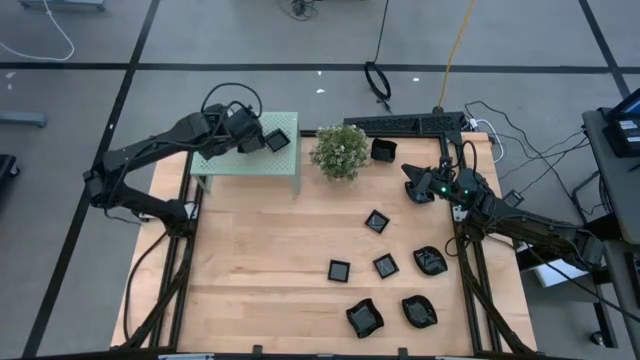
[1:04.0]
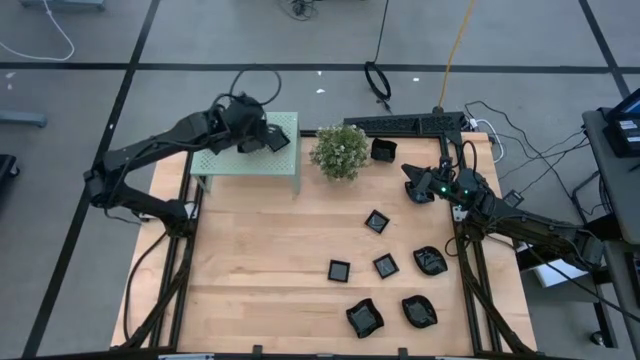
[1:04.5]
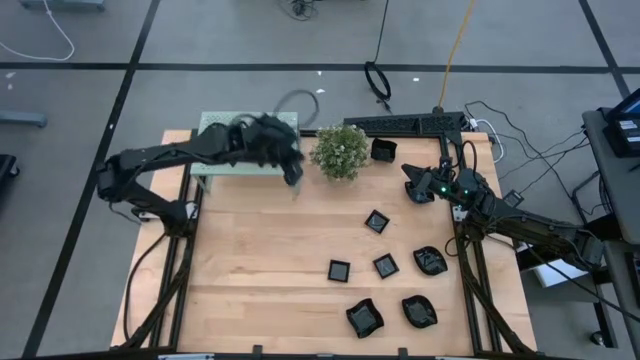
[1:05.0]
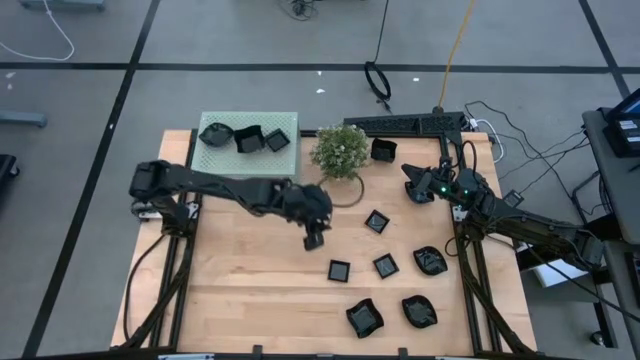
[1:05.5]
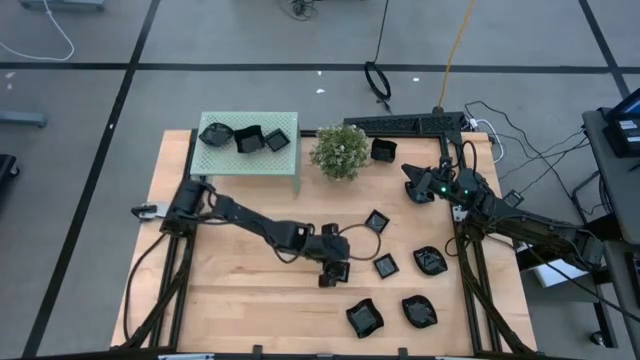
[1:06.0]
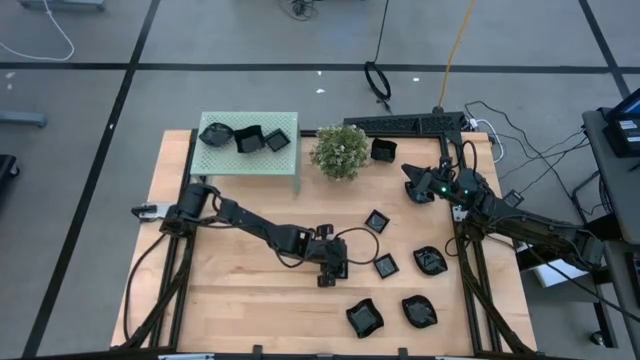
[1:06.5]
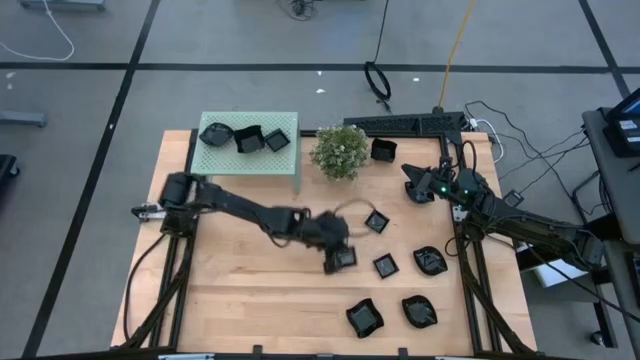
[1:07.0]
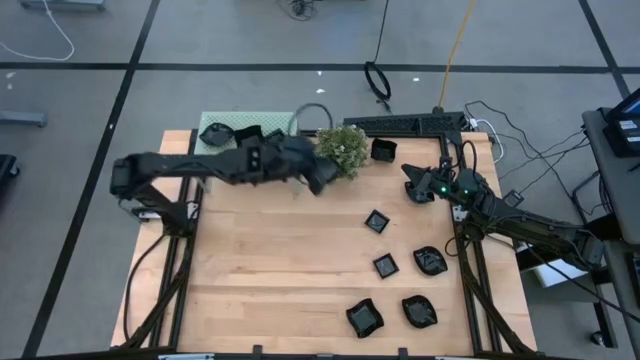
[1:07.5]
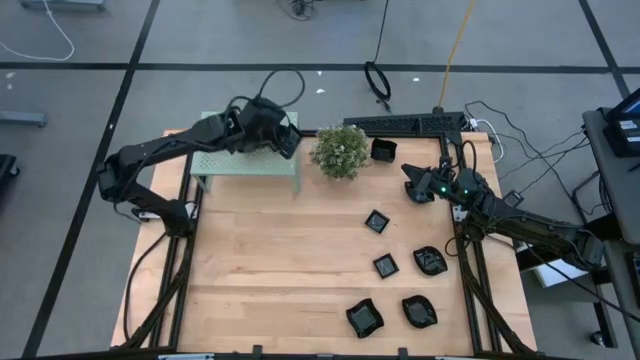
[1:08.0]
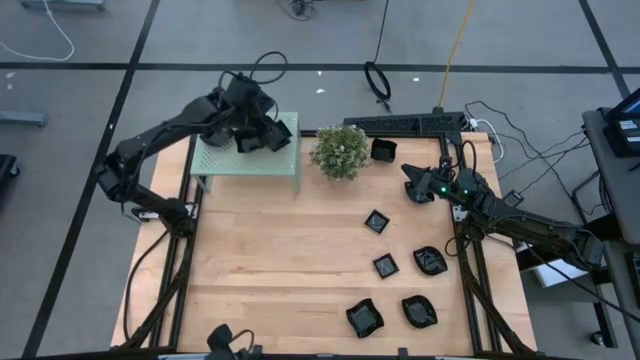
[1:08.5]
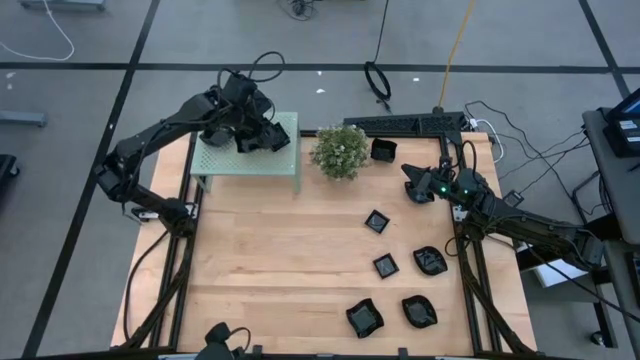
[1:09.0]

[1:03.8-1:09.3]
Task: Pick & Place Mini shaped plates
Stack the square plate on top of the square plate on the shelf

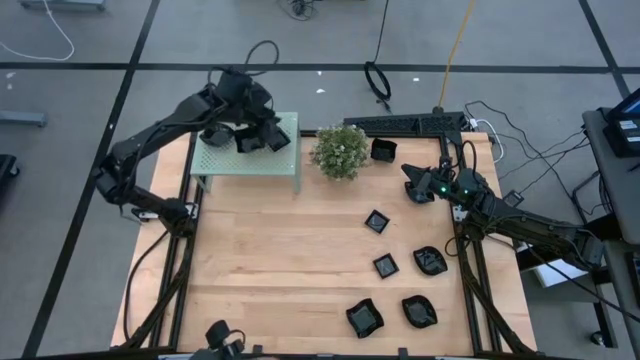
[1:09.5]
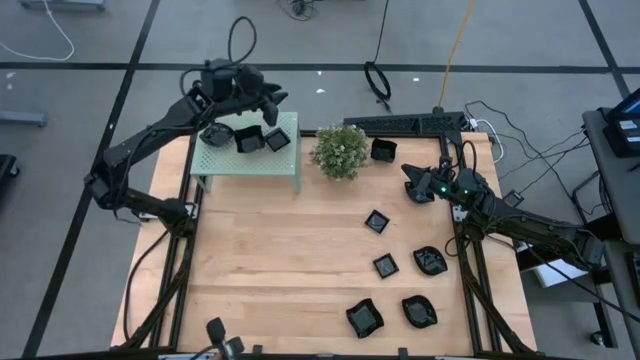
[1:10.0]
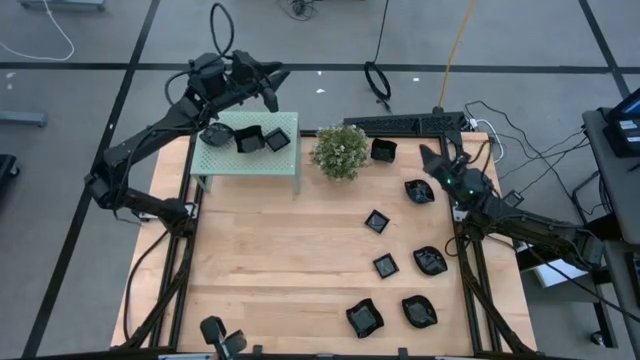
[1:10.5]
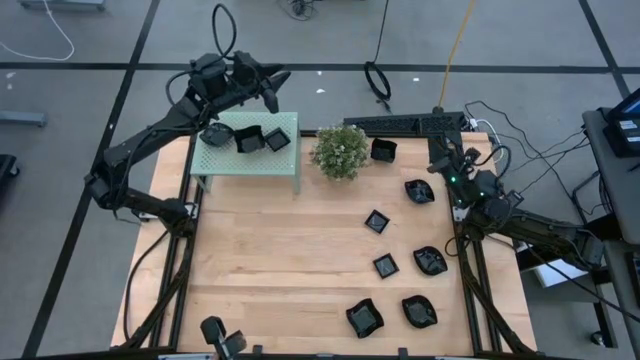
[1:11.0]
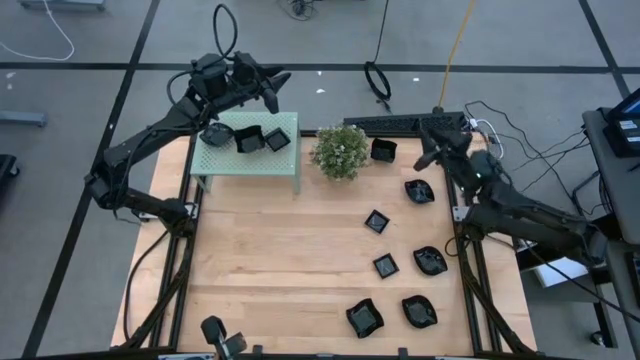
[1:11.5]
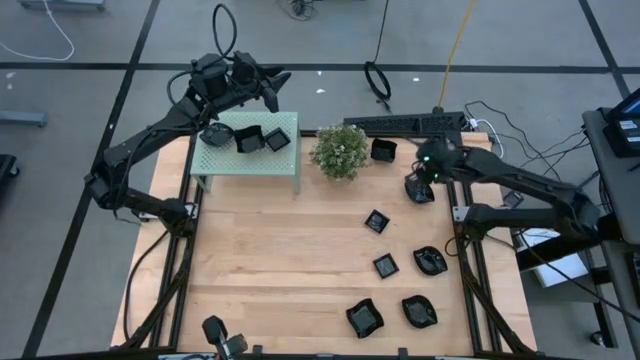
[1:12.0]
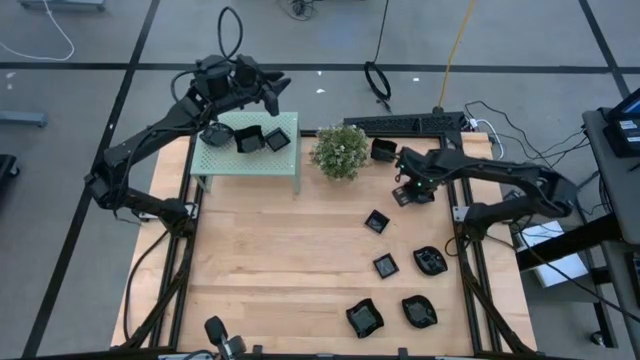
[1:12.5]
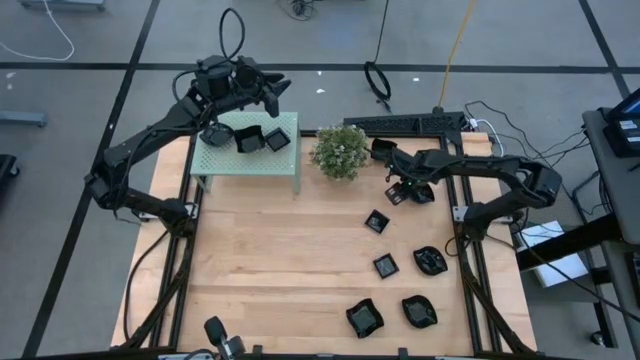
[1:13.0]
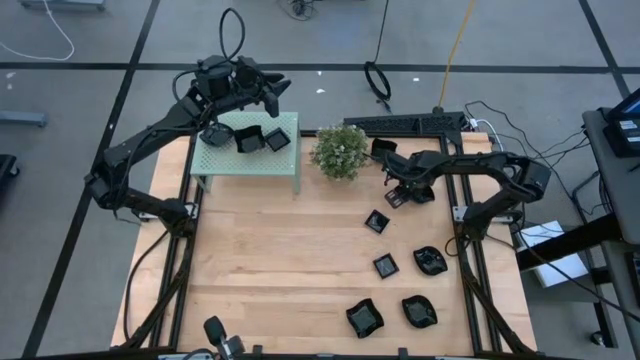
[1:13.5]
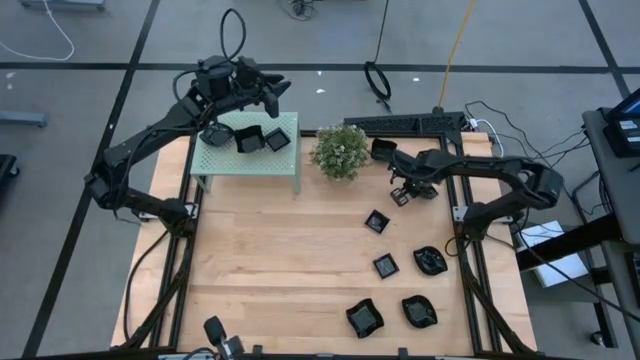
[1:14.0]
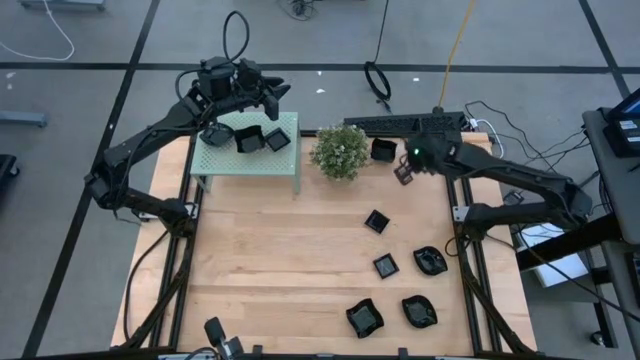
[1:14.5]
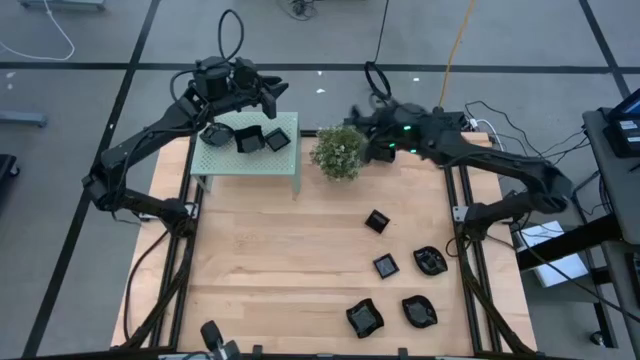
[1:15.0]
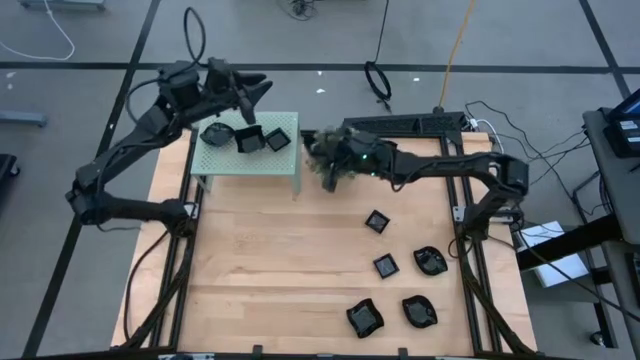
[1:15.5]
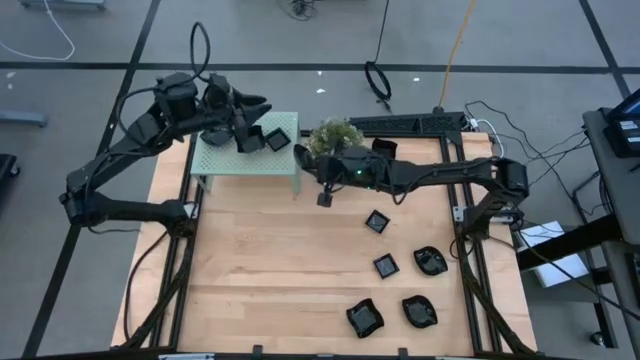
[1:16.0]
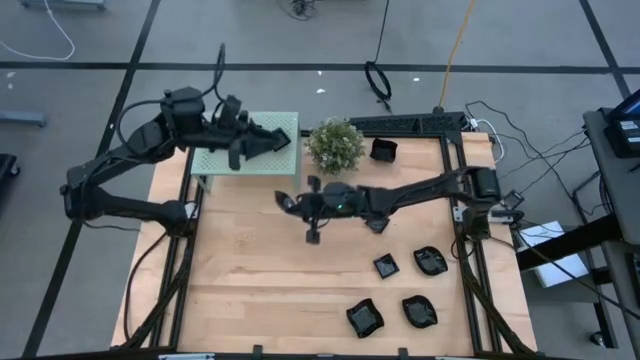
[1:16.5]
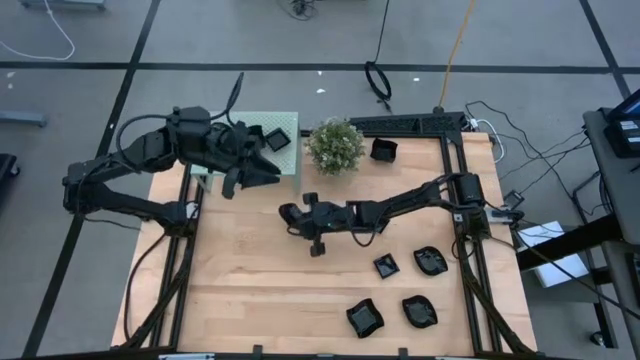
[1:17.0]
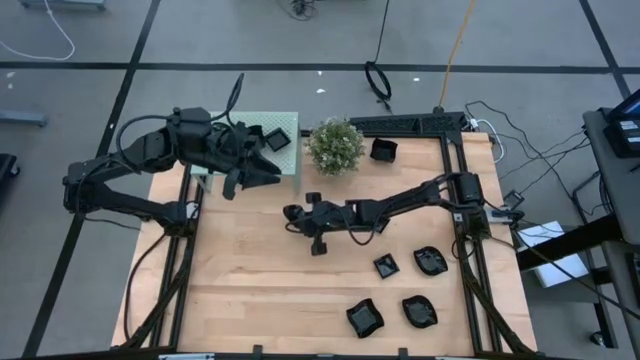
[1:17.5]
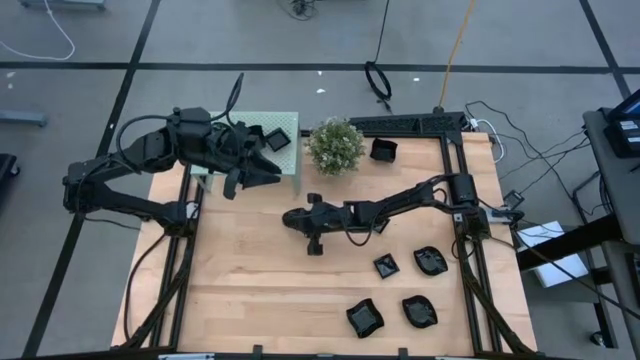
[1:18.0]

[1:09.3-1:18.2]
Move the leaf shape plate on the center of the table

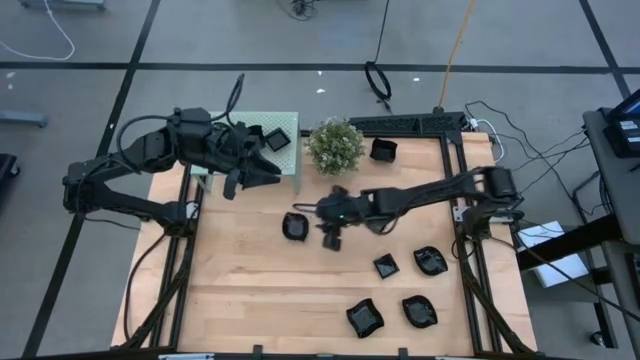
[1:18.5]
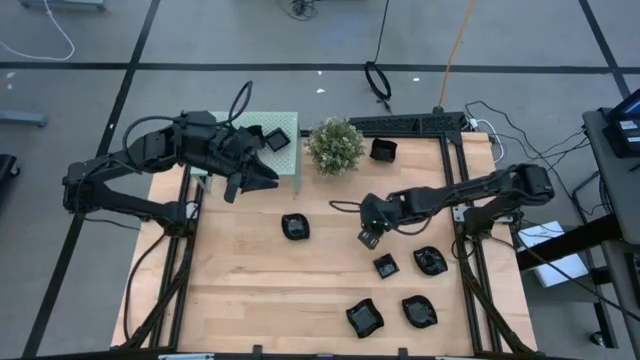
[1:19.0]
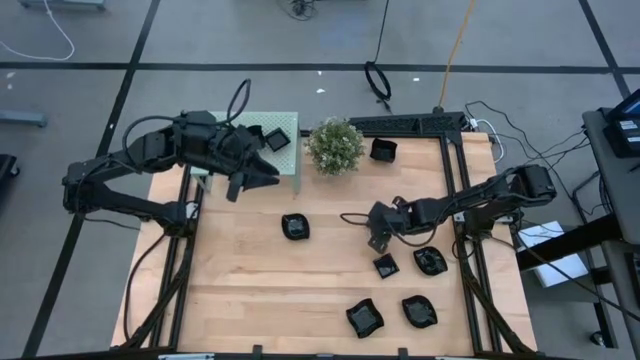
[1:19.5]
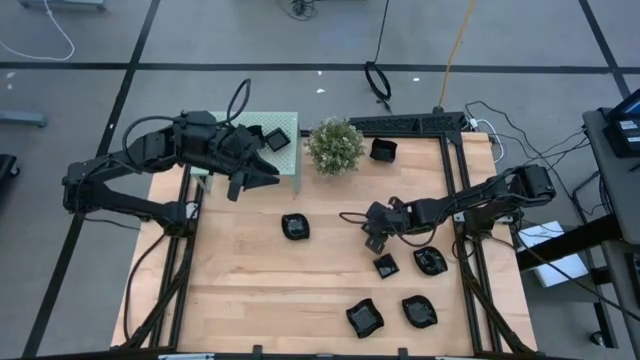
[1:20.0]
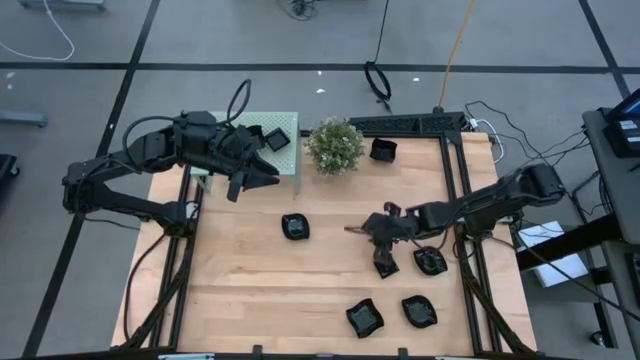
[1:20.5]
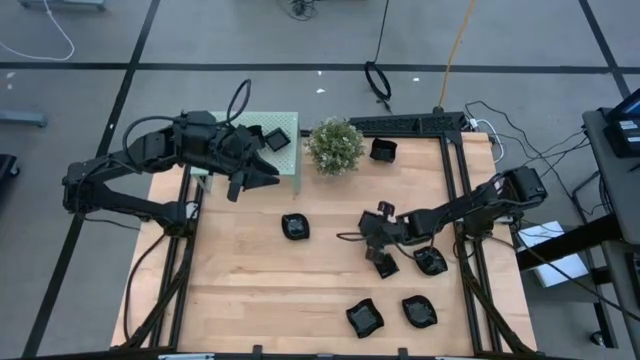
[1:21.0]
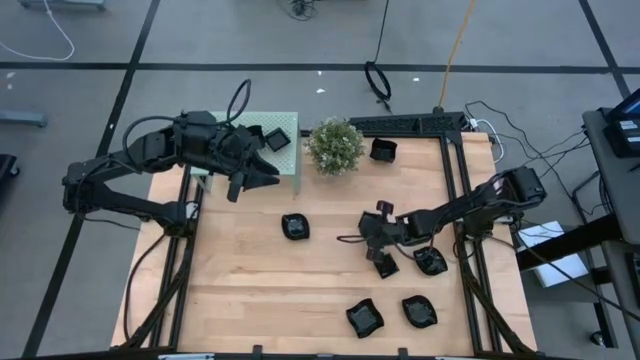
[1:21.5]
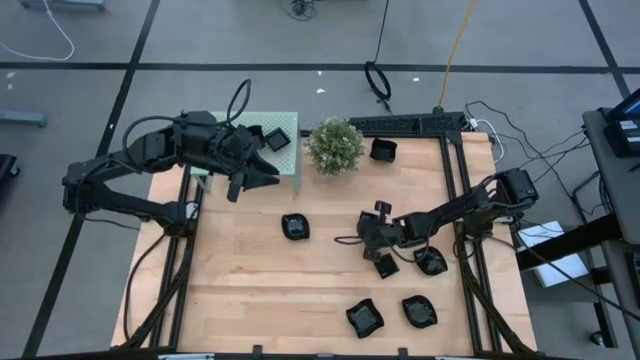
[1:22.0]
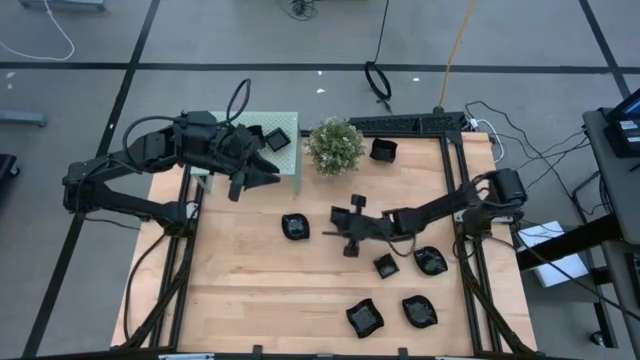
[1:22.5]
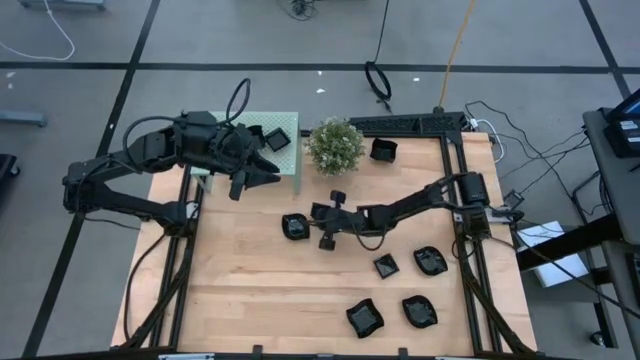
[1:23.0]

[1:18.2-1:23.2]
Move the square plate on the center of the table

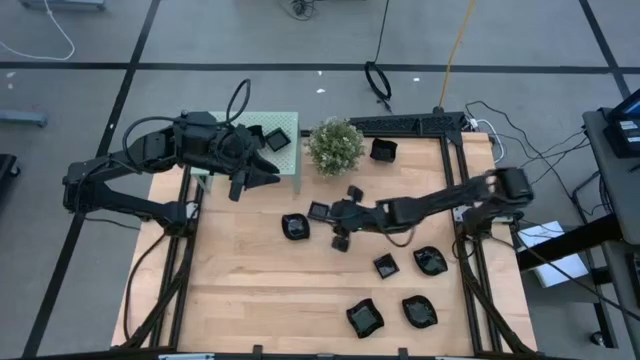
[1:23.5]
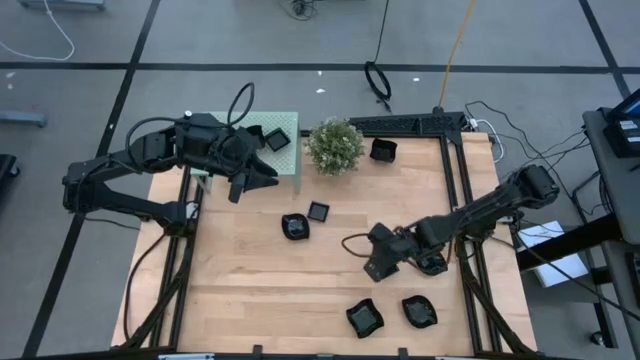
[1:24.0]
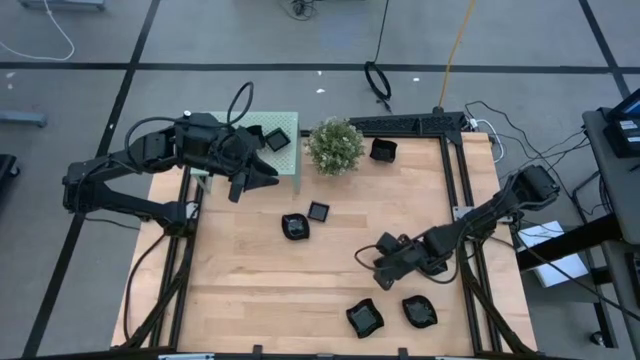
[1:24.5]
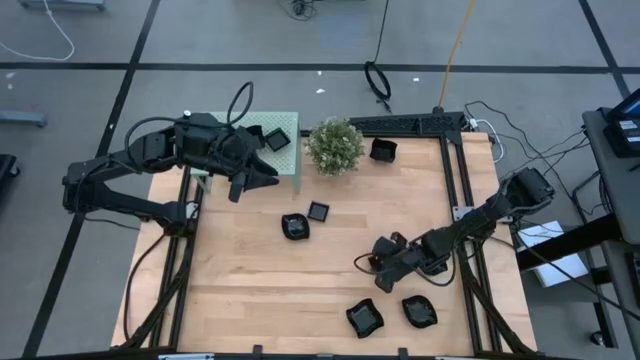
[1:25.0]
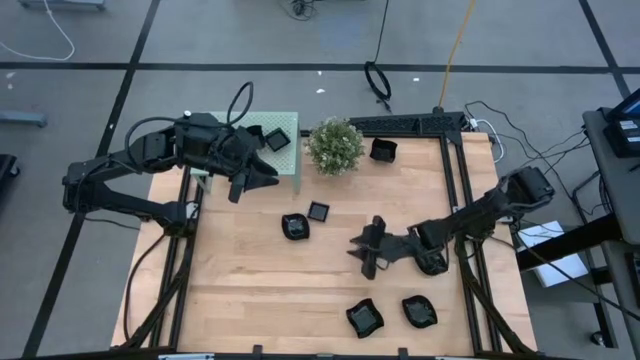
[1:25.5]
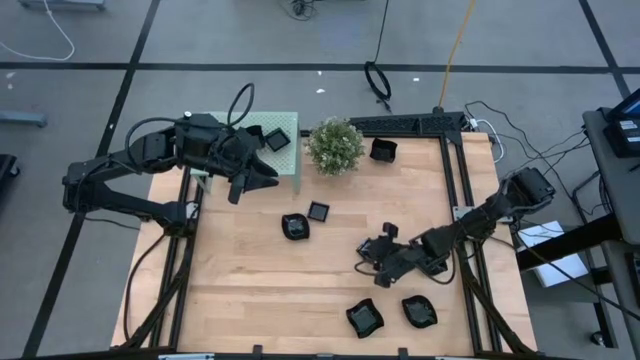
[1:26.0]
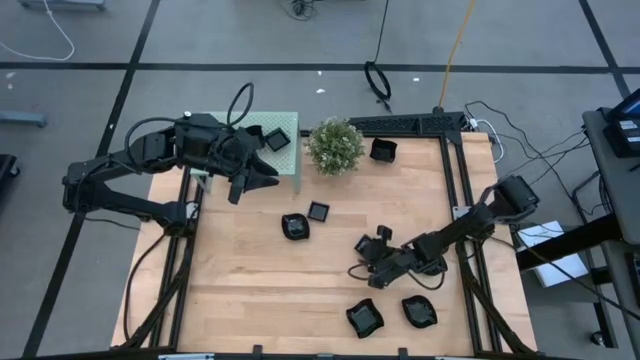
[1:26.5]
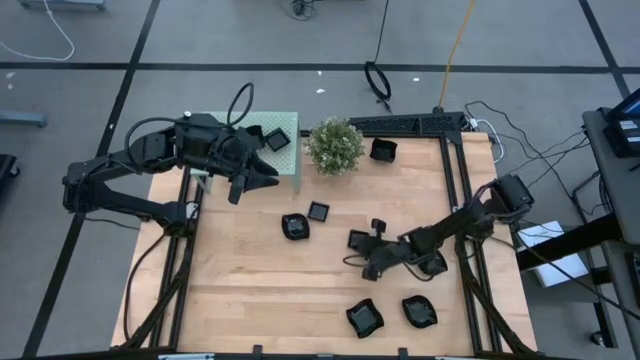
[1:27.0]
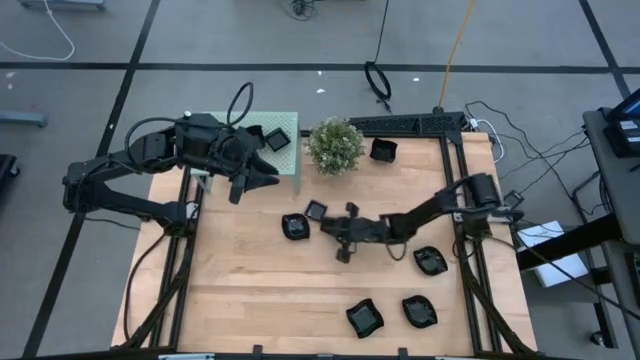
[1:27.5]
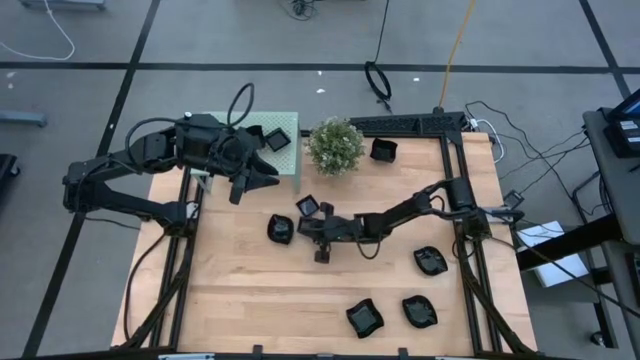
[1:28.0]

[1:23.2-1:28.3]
Move the square plate on the center of the table
